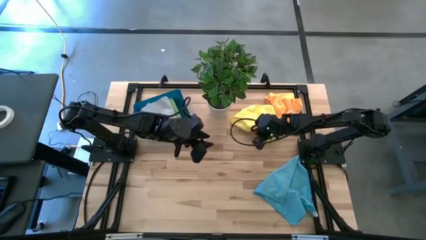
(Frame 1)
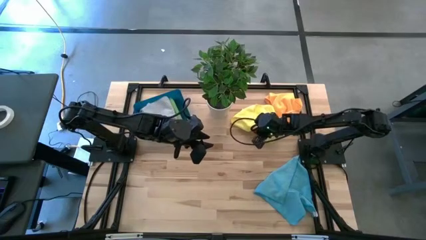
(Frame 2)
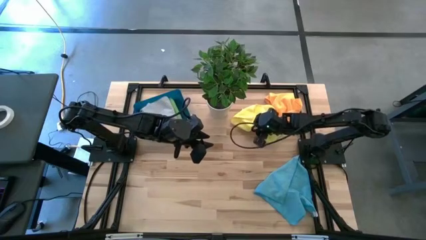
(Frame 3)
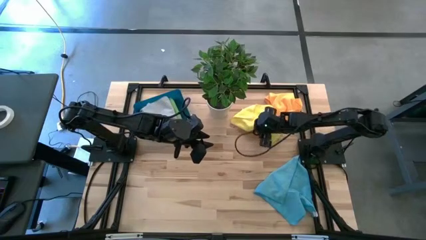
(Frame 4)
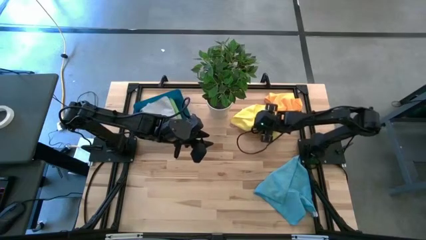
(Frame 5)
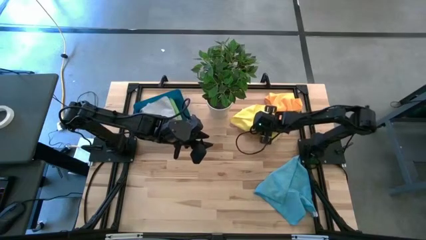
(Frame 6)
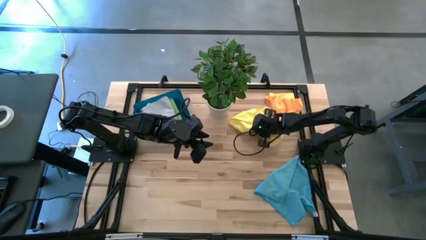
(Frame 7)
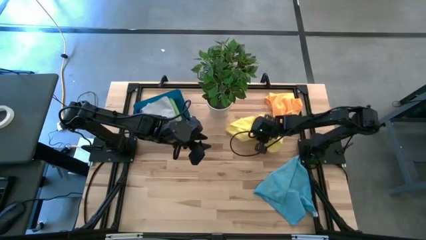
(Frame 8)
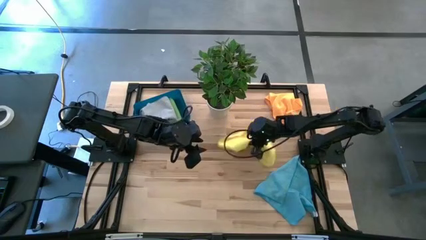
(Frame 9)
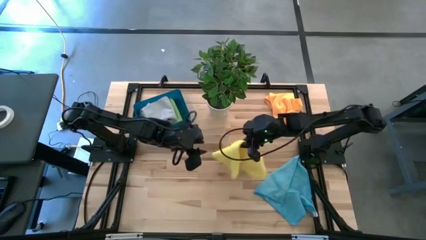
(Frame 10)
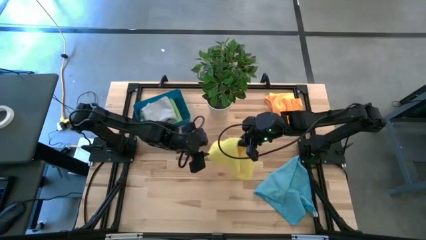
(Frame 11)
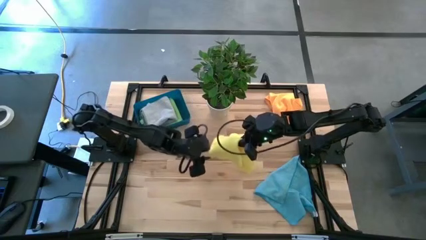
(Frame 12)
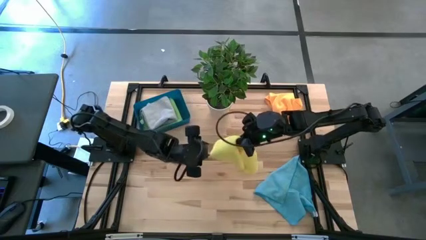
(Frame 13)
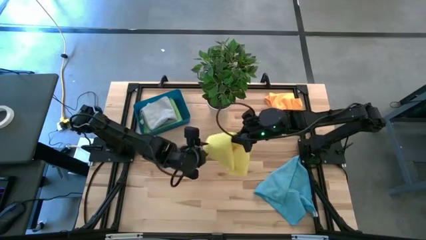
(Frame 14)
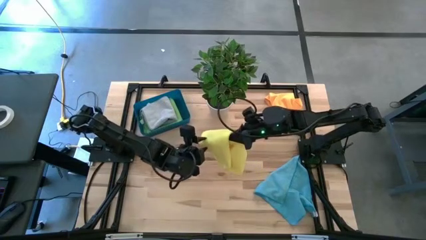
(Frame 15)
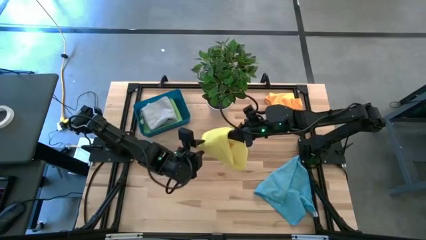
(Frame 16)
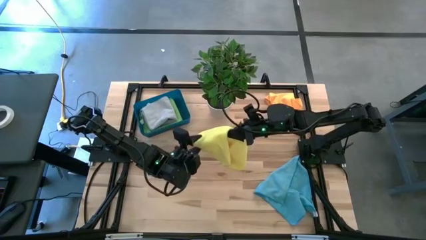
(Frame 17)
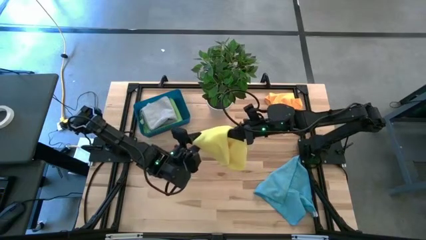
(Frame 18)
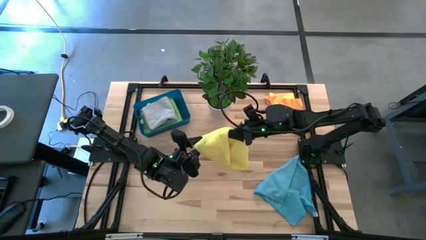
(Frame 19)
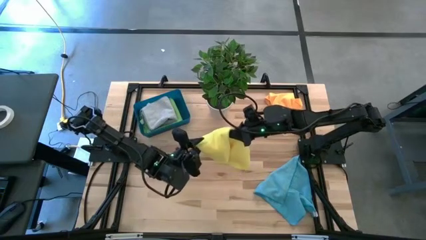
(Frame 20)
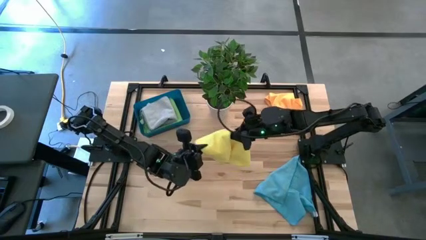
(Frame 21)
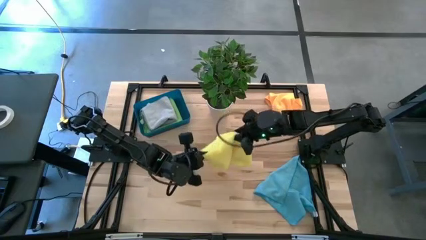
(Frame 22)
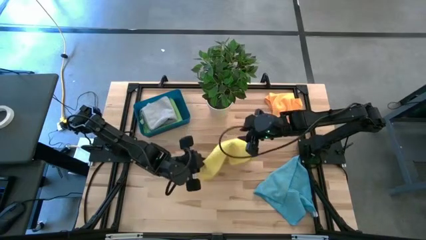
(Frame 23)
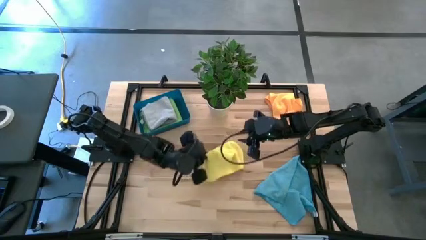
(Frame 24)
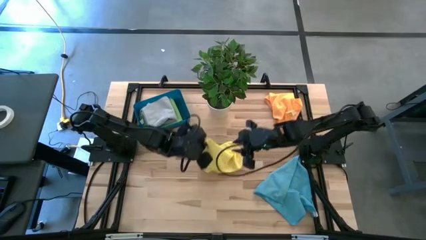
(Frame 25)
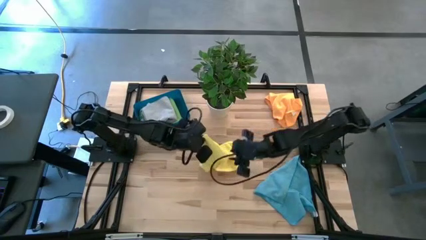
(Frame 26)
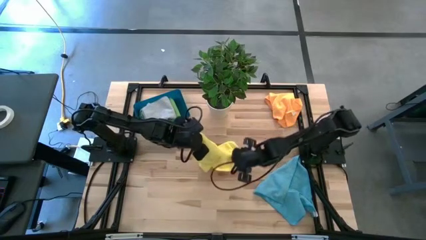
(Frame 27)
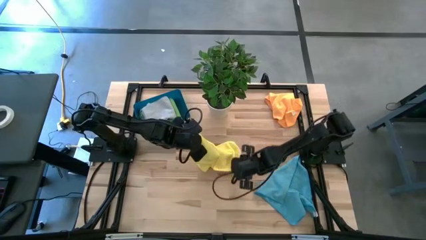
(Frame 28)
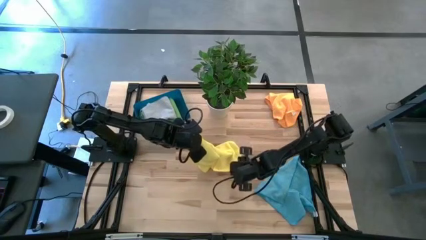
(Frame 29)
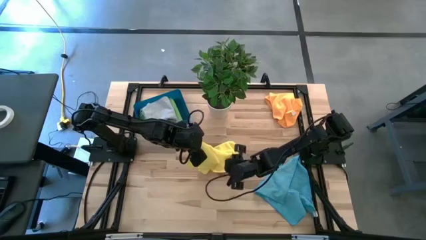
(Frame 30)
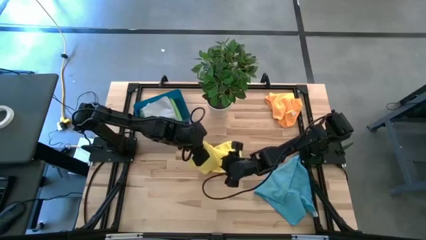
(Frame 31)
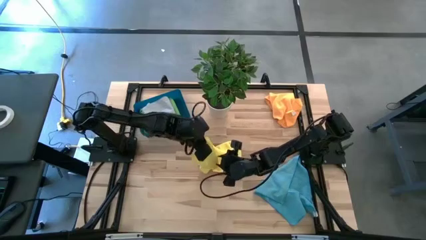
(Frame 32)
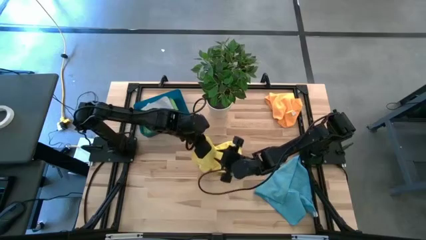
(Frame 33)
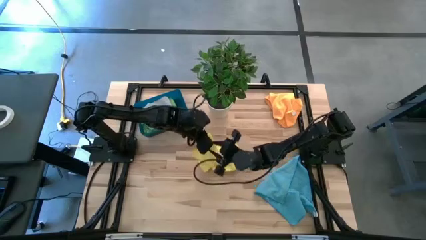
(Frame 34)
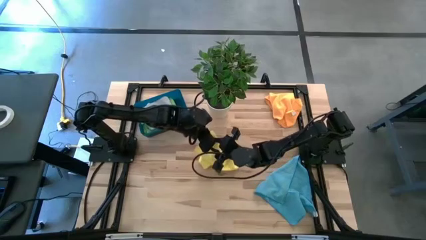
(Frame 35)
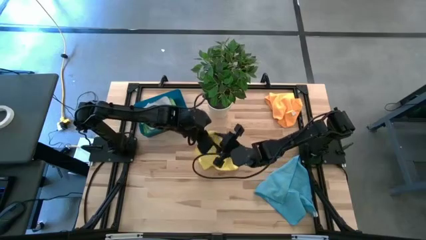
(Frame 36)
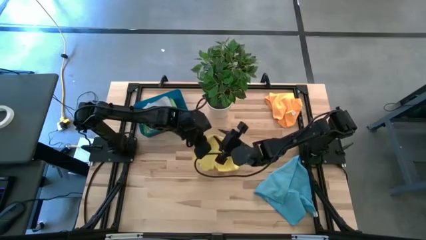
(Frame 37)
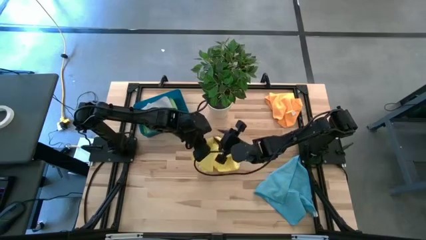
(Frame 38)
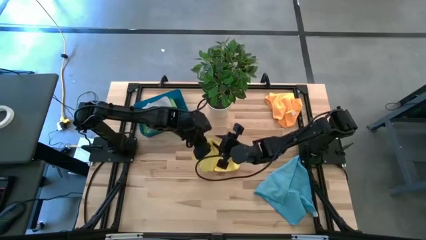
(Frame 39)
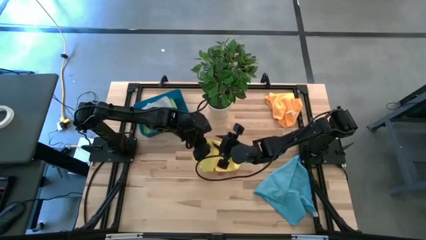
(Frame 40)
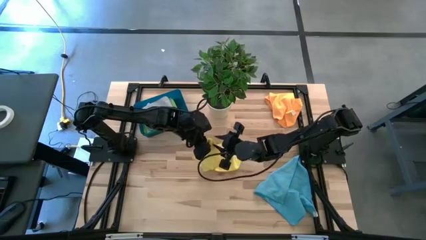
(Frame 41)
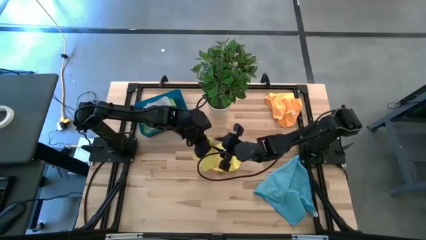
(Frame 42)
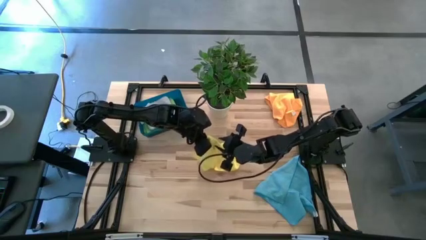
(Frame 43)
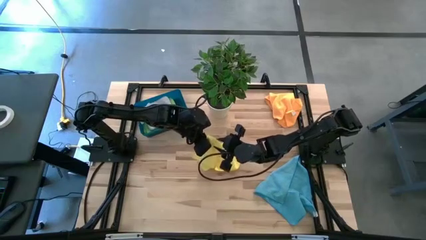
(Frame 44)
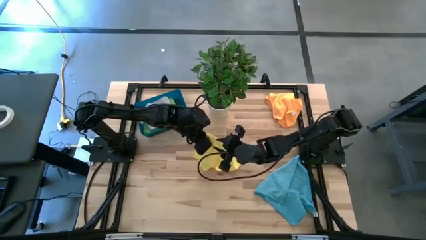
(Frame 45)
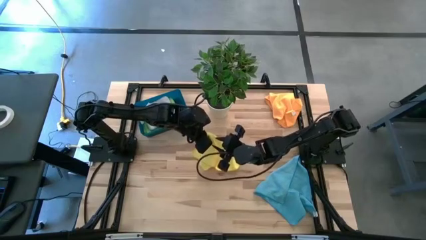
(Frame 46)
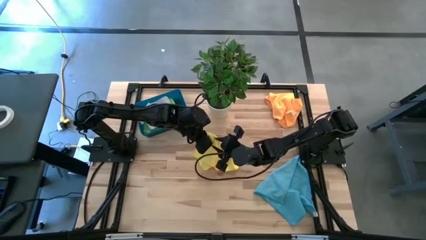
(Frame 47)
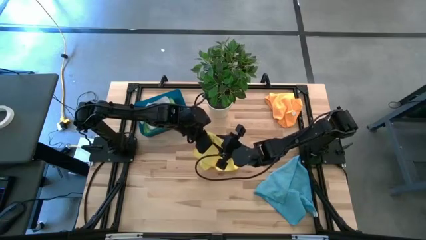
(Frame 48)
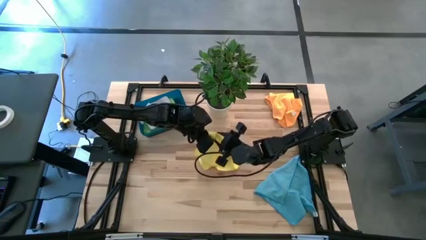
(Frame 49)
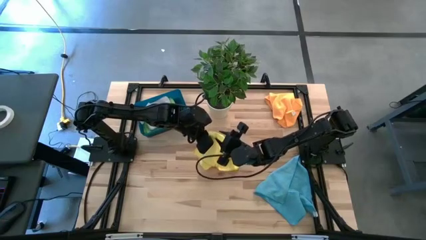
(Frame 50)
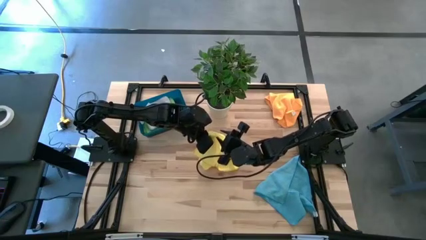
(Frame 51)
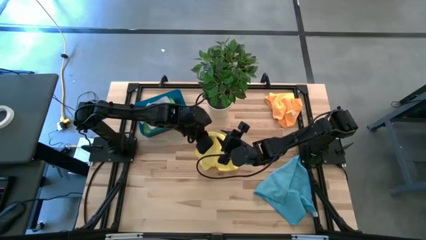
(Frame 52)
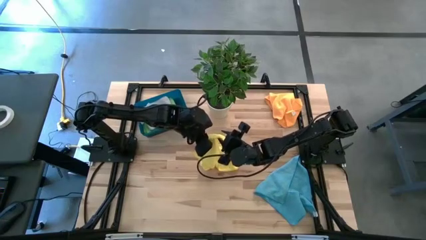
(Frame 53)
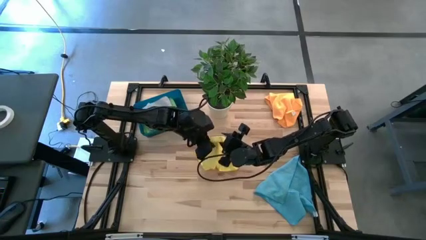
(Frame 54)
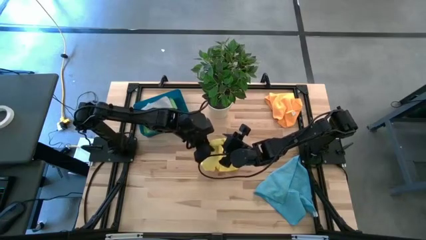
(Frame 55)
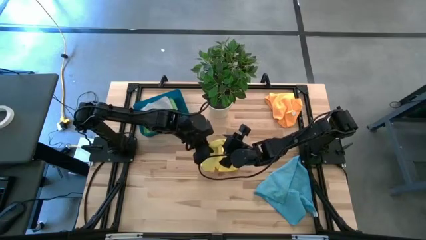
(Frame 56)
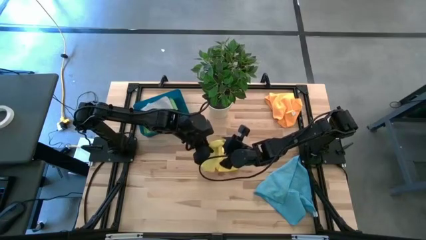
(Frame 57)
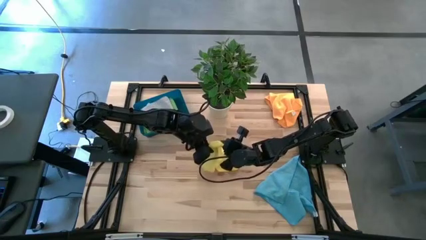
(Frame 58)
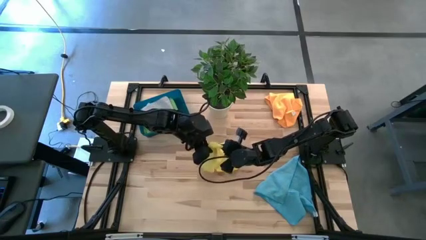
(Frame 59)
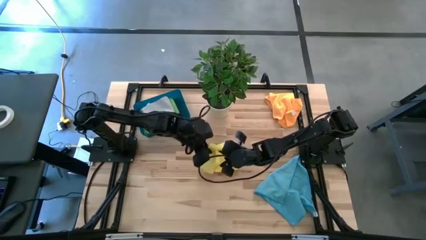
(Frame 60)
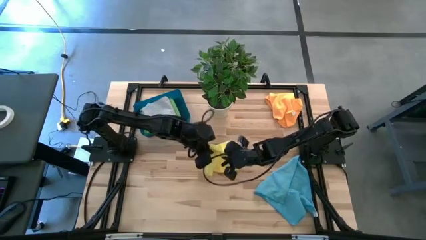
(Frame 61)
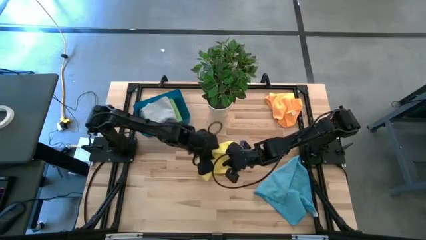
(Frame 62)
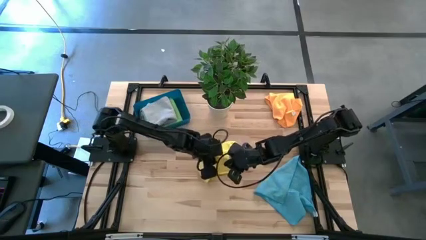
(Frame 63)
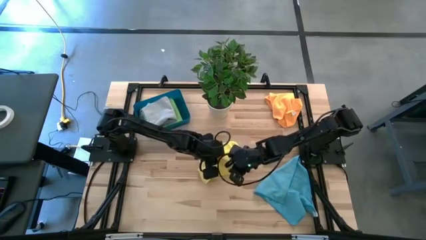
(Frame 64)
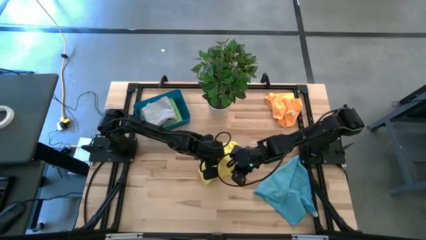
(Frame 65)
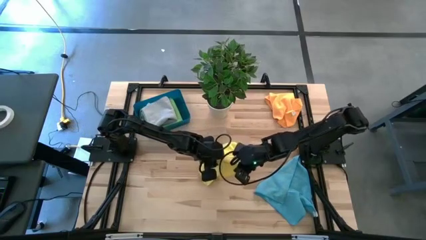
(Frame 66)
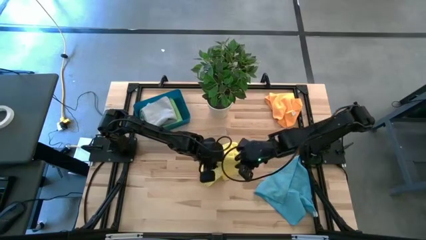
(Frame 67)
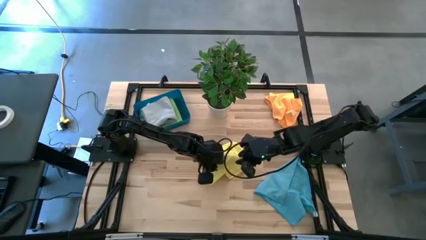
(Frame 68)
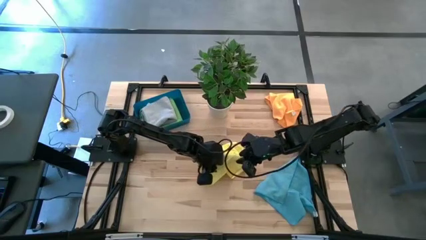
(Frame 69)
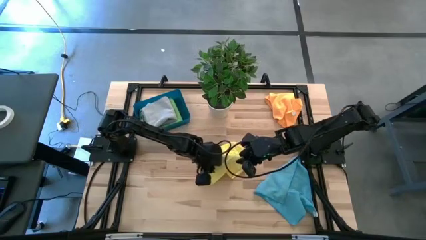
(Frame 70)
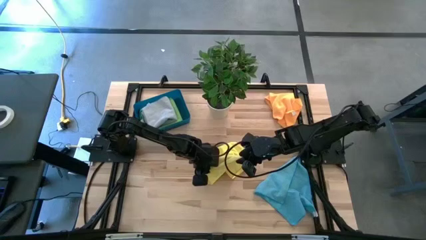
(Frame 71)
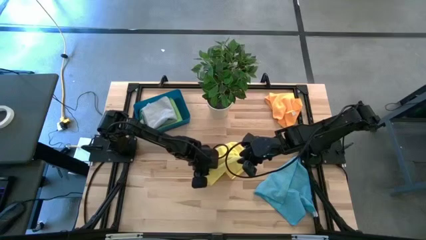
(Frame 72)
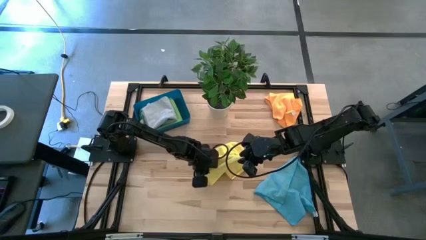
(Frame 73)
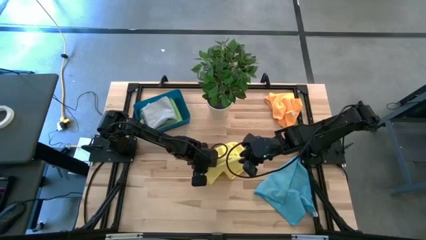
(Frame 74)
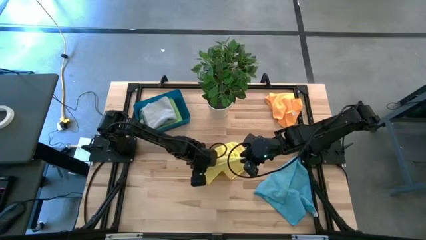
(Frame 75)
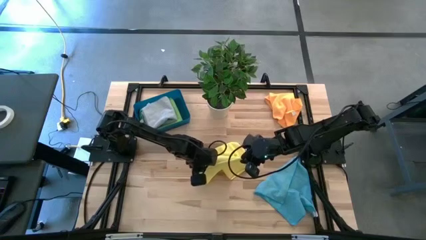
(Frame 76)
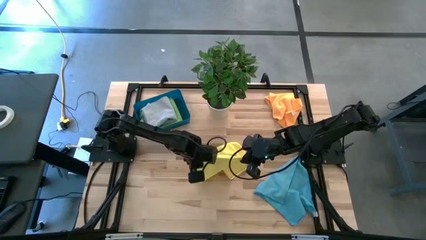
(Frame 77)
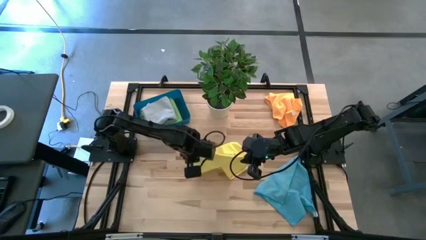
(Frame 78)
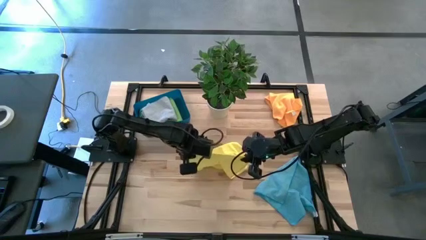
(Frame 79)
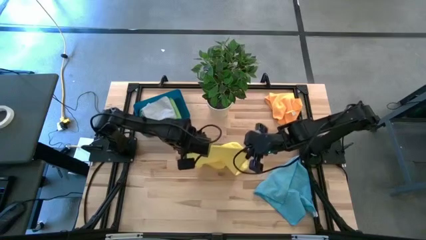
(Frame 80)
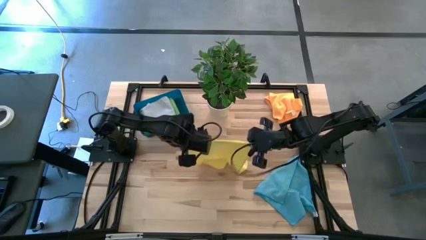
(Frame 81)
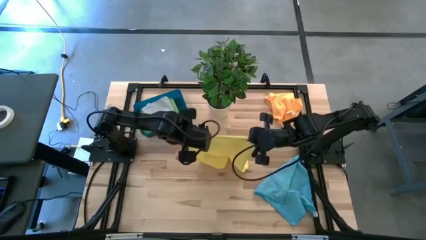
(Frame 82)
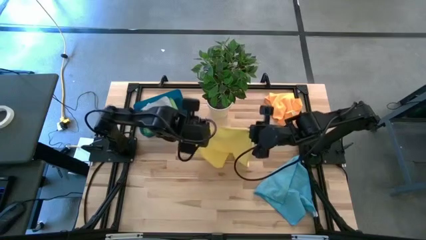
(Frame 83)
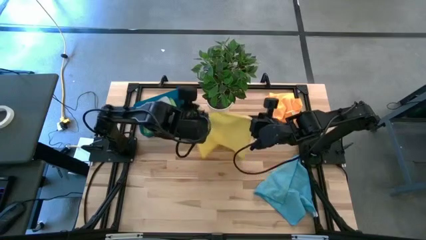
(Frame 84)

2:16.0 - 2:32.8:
Task: Fold microfiber towels
Fold the yellow towel
